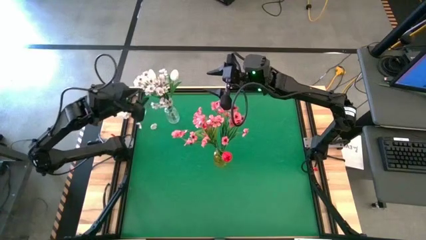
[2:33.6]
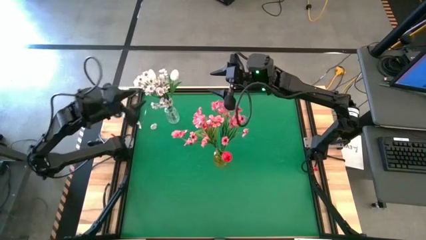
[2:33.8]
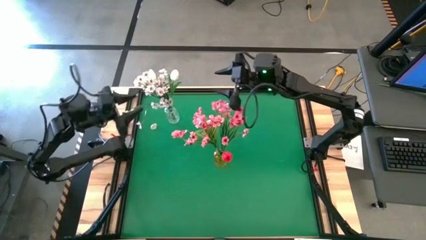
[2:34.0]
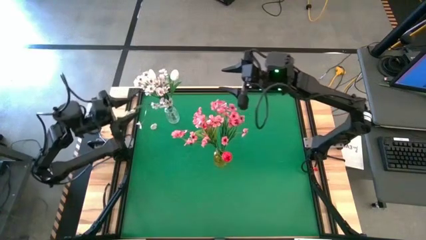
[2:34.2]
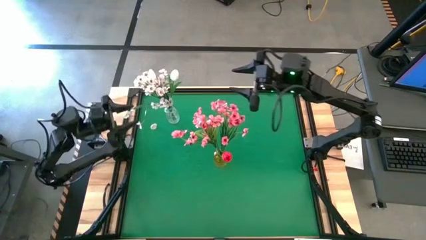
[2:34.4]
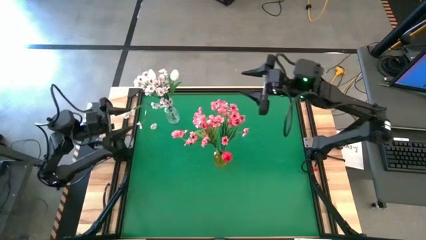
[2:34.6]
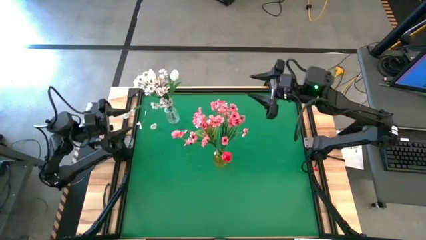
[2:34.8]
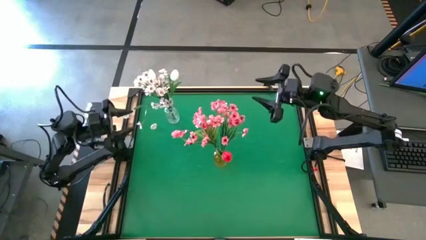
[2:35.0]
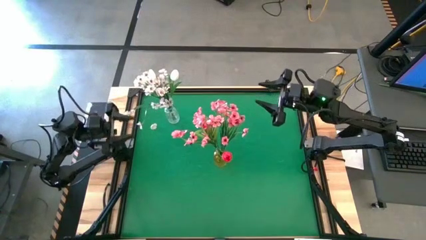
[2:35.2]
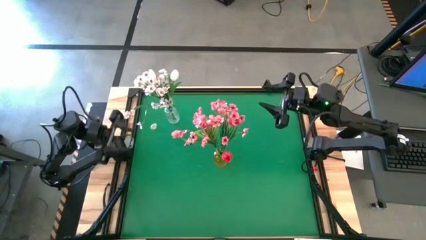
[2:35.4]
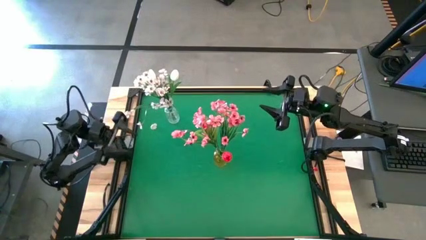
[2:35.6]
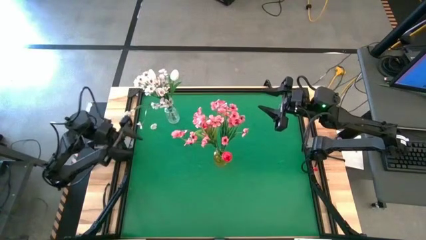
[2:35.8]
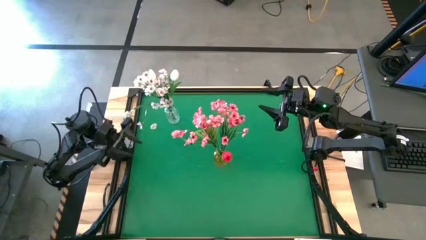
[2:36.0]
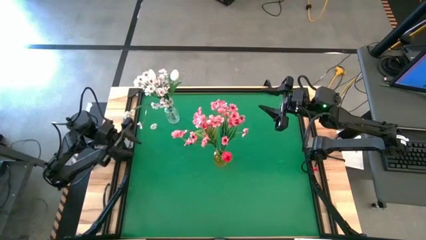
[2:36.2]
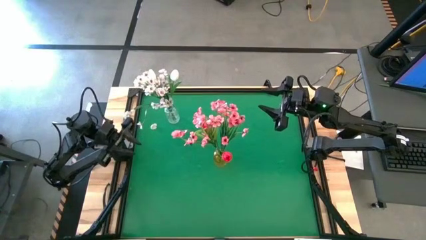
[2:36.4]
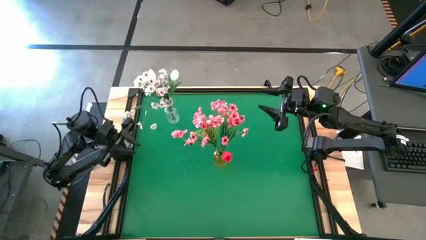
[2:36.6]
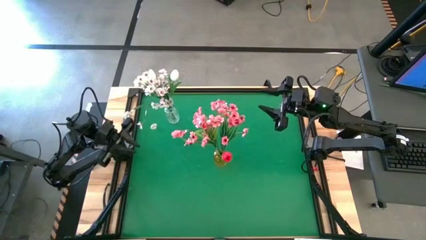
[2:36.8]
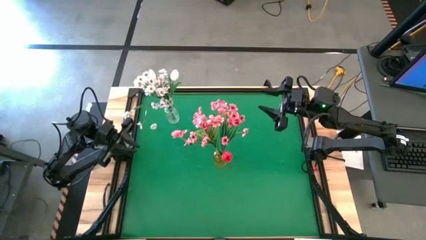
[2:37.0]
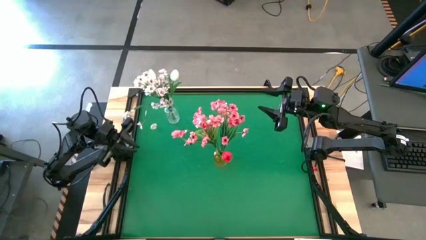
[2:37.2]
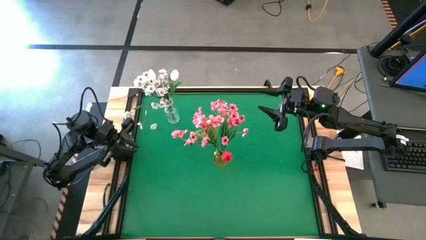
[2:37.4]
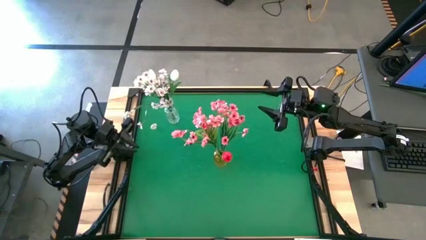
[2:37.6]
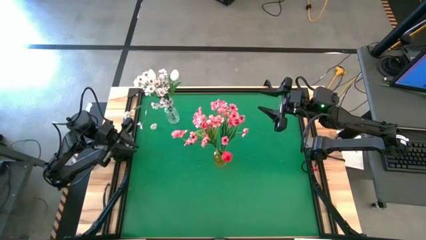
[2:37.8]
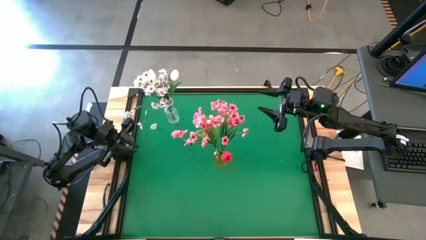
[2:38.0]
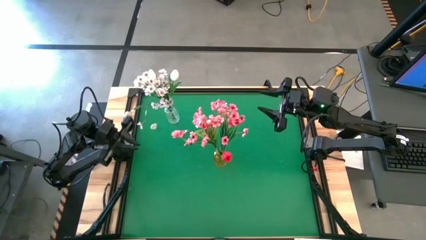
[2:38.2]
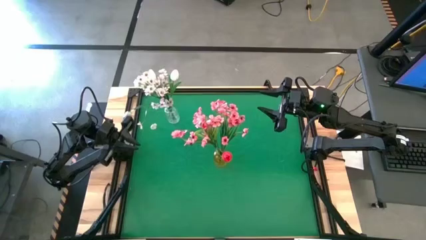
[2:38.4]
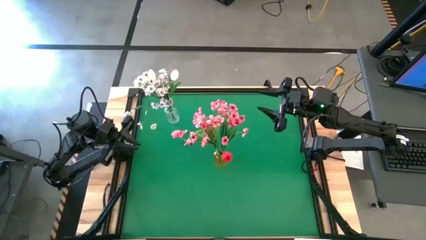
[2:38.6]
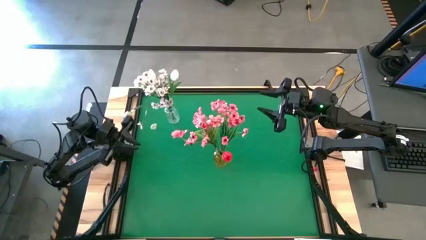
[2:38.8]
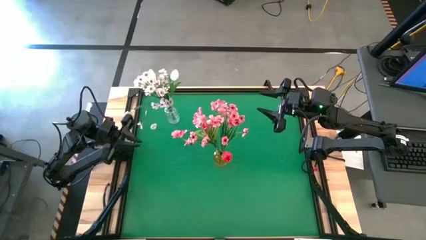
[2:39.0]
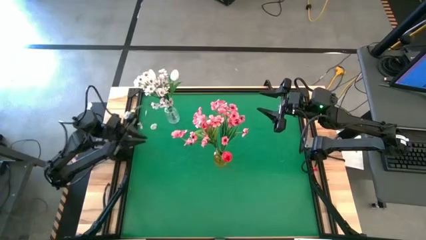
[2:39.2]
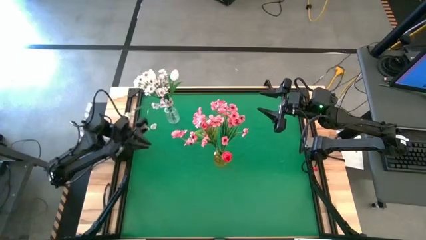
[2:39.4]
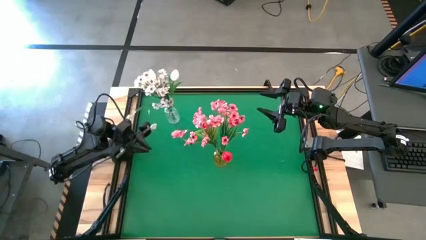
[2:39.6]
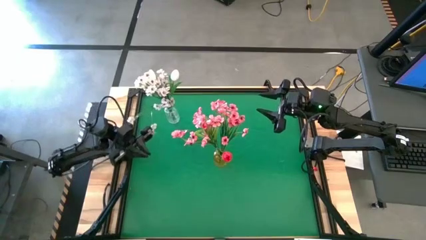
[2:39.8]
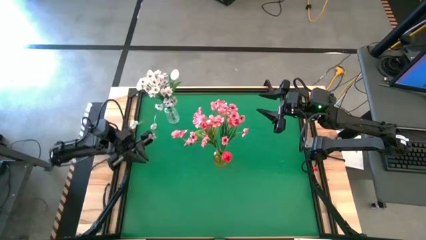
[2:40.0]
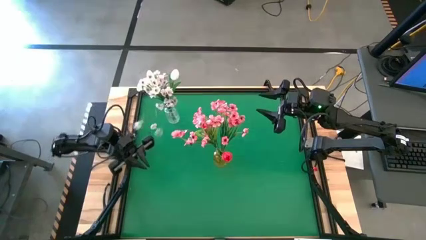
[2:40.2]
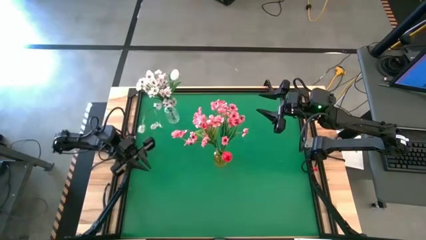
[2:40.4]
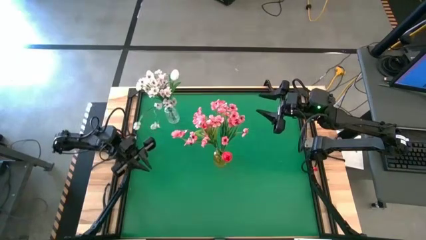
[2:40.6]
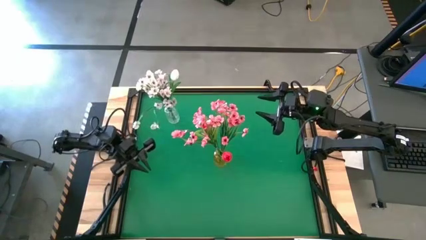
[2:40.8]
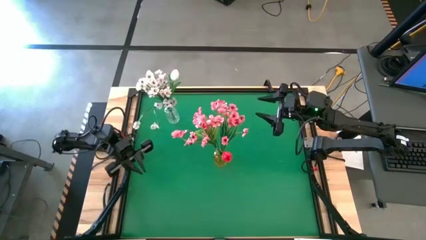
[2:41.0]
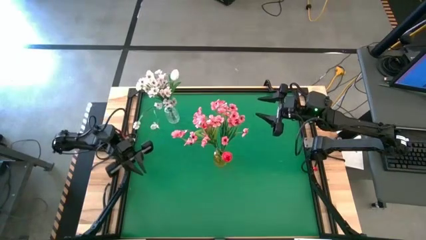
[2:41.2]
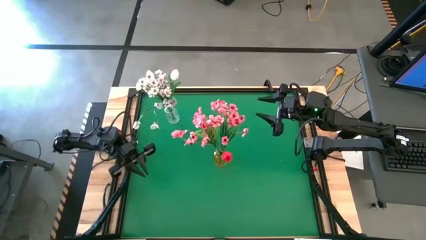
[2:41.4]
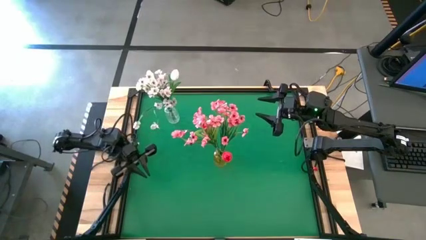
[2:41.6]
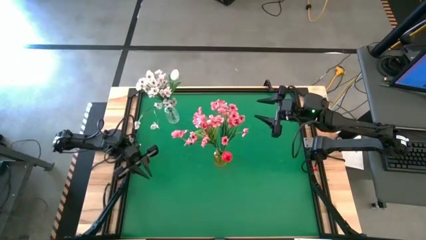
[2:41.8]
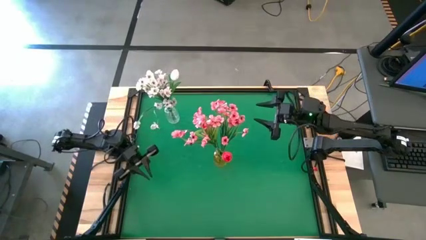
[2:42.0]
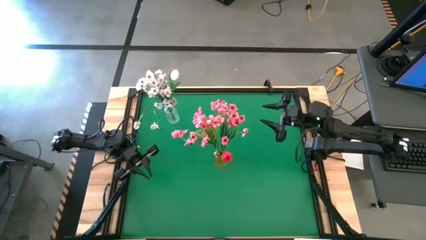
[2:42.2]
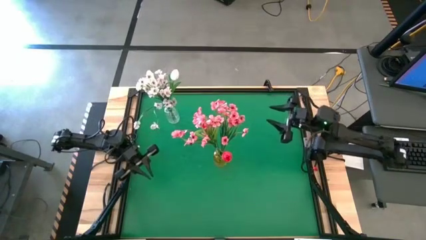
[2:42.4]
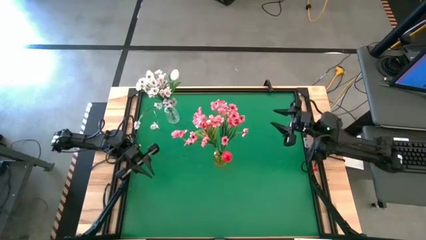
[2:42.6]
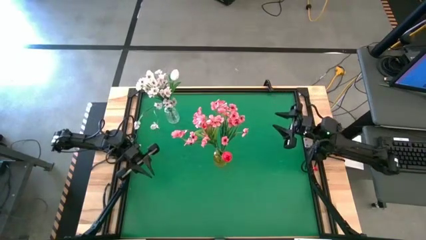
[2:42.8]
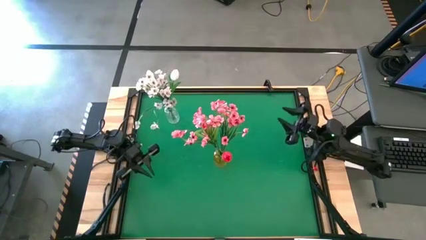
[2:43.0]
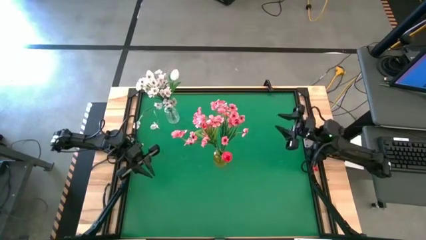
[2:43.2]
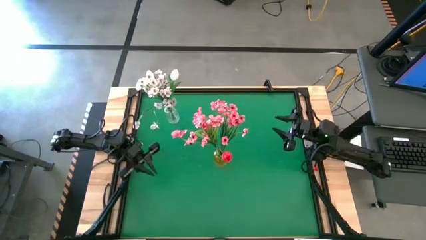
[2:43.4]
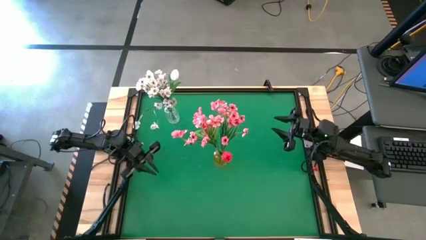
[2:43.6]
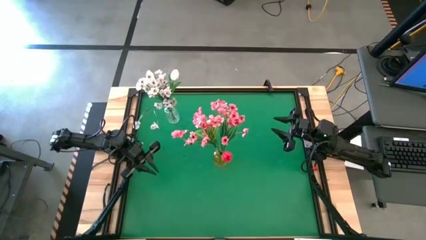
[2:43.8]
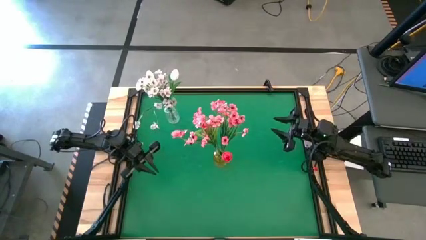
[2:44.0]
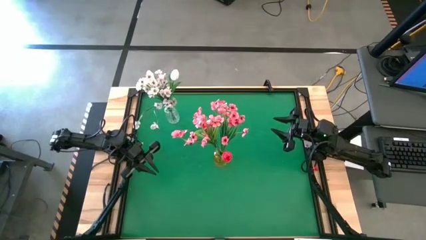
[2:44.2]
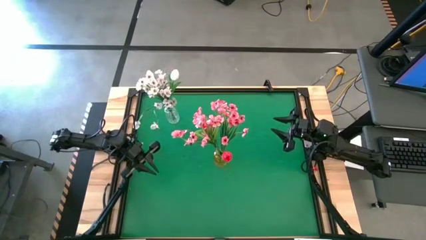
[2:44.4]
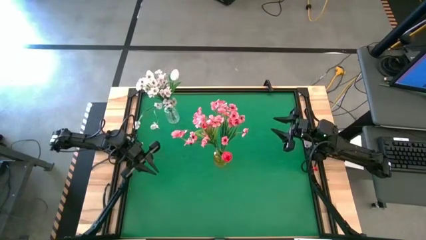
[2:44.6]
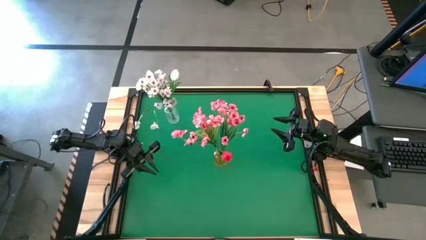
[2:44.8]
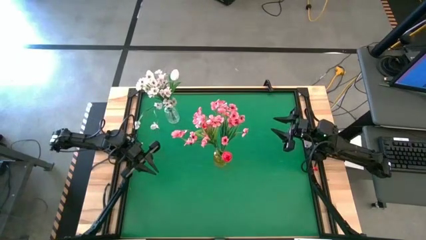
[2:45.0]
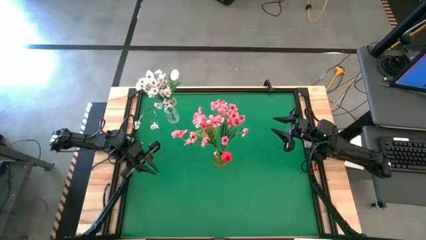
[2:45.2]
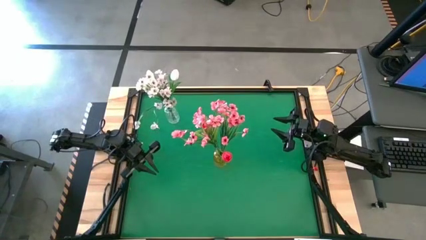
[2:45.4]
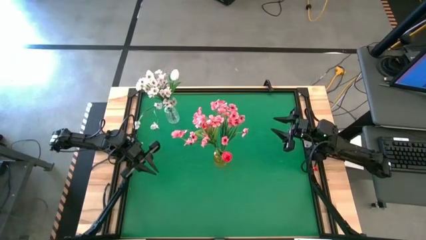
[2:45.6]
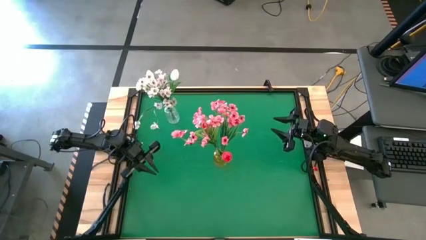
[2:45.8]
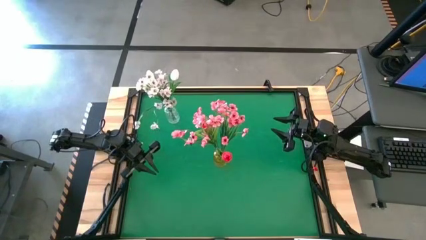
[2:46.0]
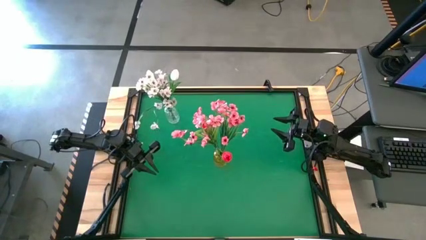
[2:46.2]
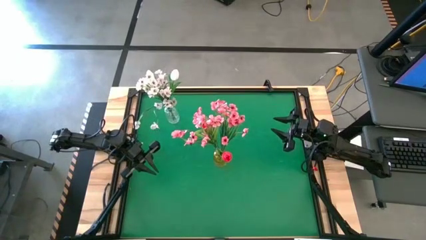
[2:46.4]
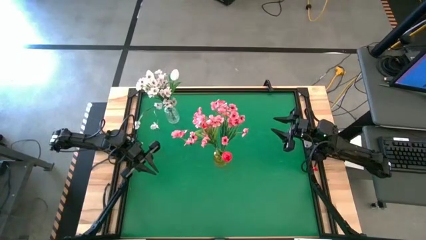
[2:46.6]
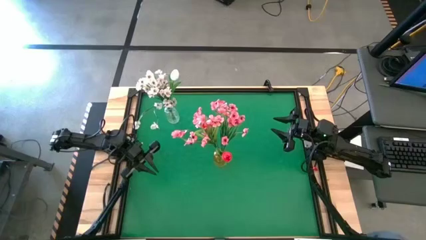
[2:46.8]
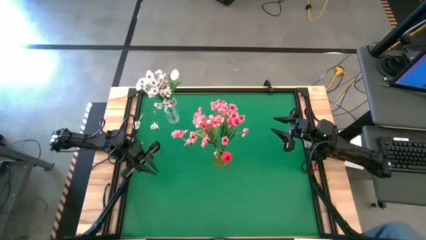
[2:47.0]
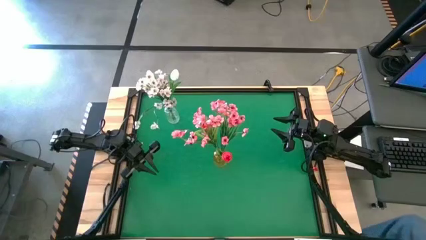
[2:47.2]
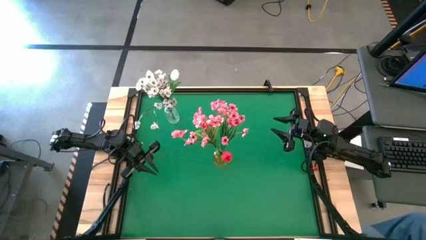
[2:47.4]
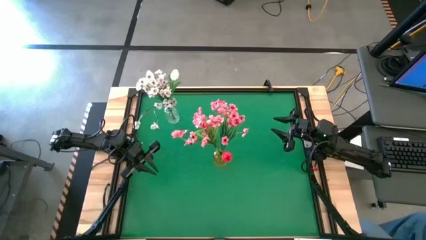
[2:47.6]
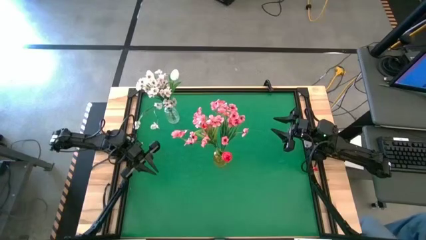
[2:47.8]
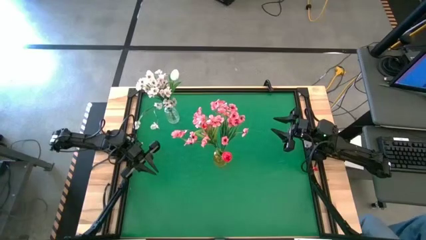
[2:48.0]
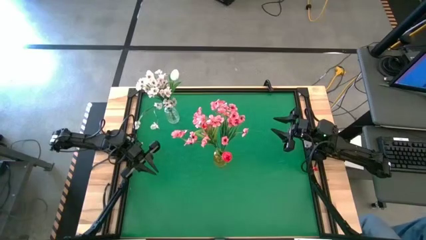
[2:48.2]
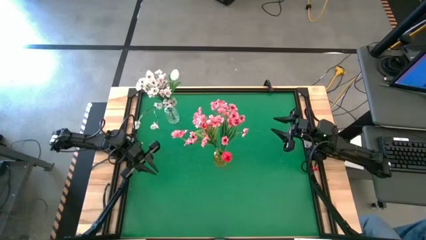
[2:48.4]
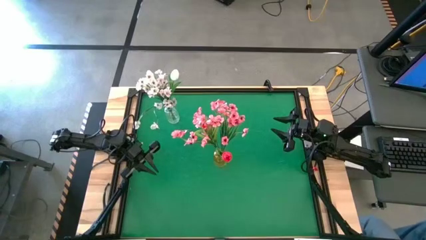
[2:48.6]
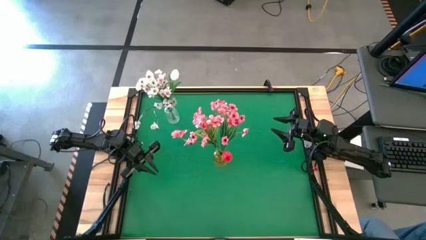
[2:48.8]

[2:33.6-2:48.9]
Task: Sort flowers into vase by color
Return to Home Position

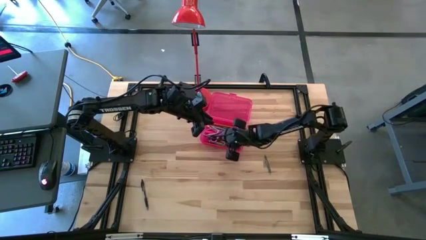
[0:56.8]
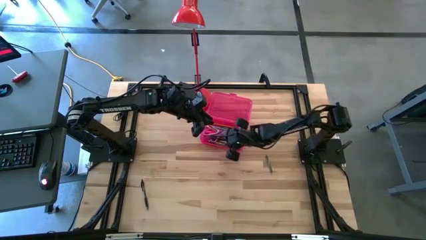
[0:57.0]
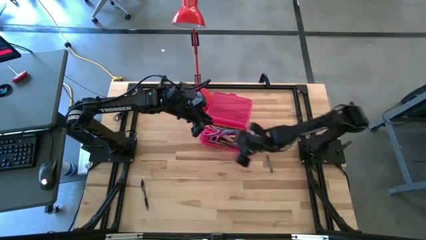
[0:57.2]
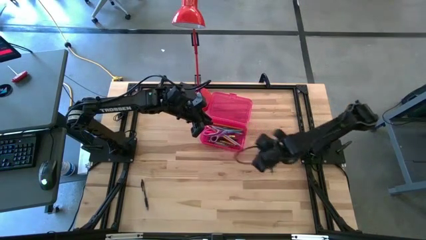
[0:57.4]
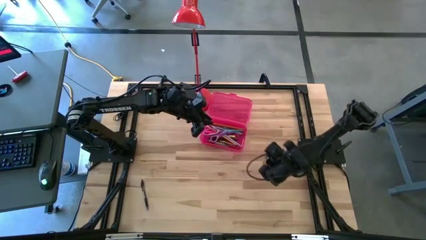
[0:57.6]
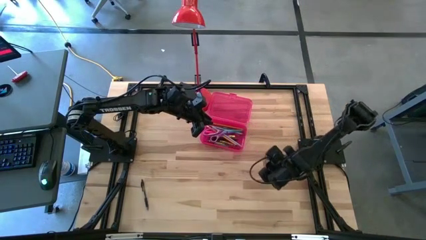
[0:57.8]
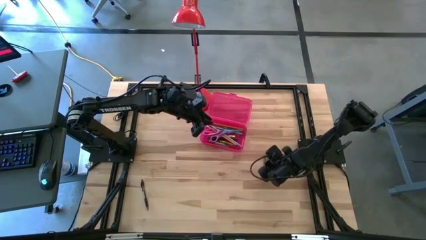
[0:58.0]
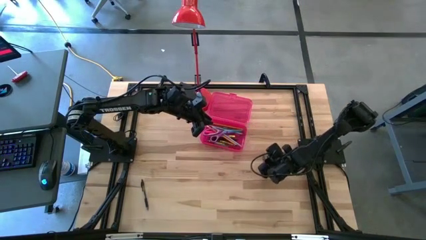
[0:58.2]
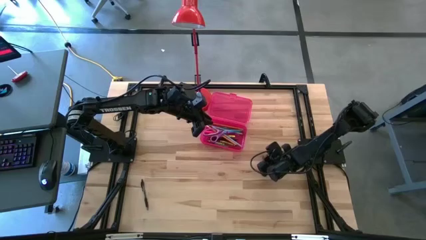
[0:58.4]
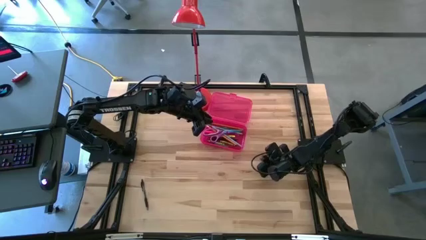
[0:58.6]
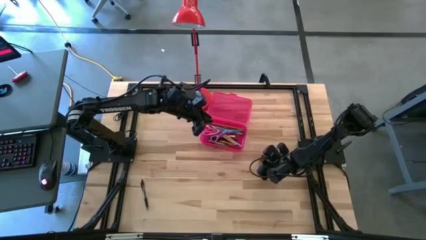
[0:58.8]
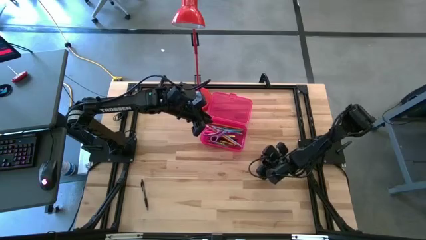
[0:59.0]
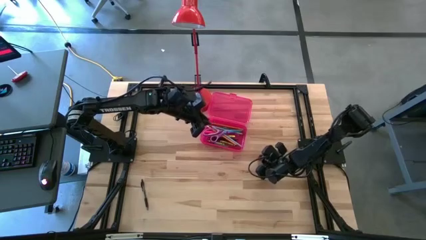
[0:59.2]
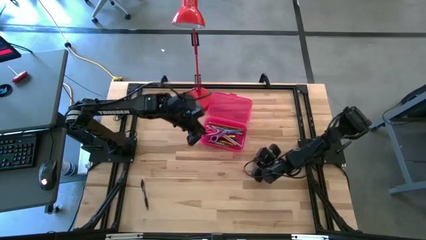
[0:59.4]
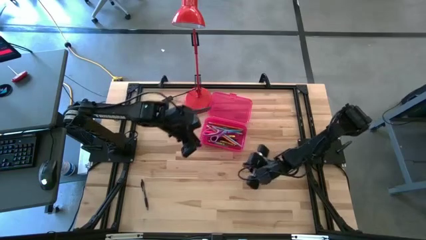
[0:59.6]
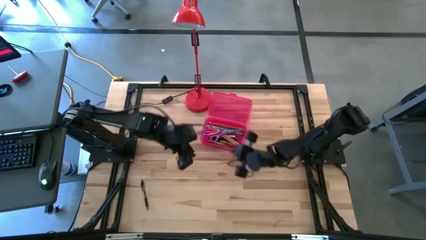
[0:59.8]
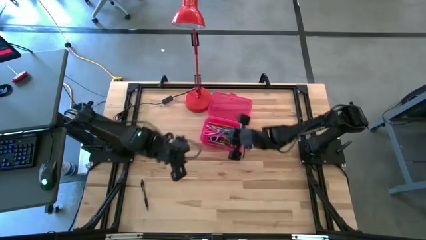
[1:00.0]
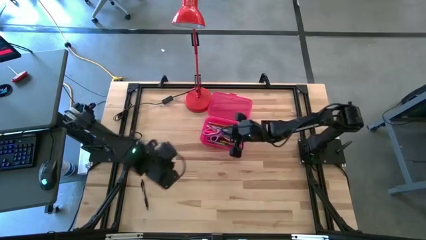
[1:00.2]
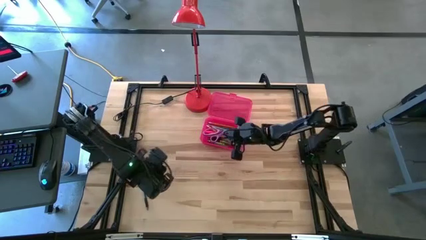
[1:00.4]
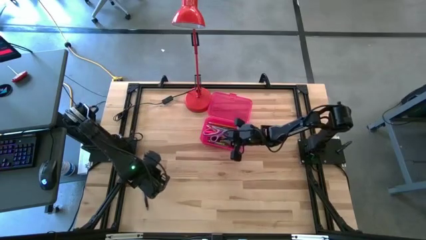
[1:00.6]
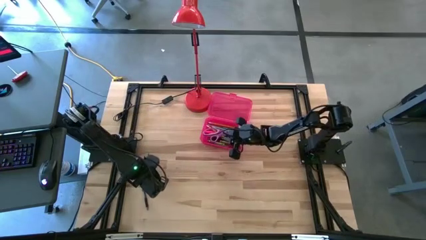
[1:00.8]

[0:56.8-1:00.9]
Task: Pick & place school supplies into a supply box
Put the dark green crayon into the pink supply box
